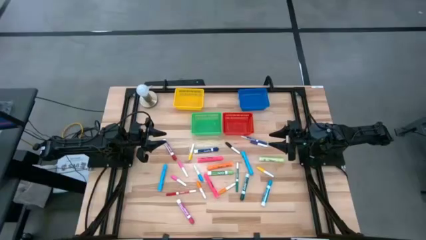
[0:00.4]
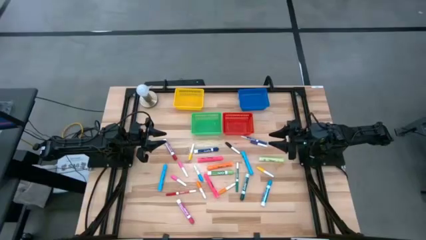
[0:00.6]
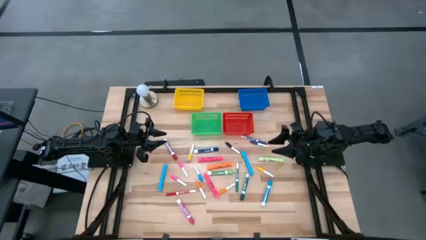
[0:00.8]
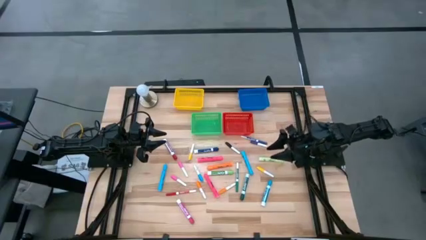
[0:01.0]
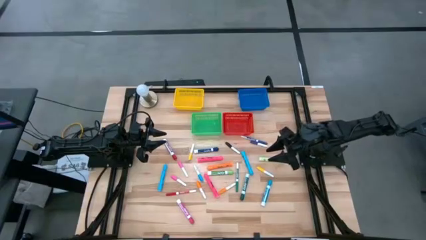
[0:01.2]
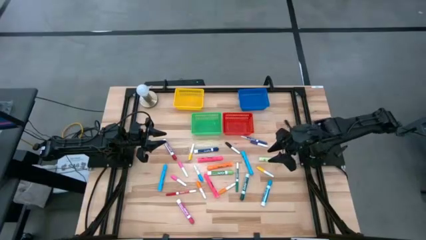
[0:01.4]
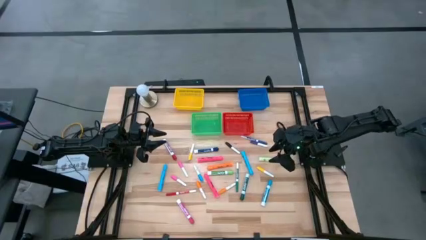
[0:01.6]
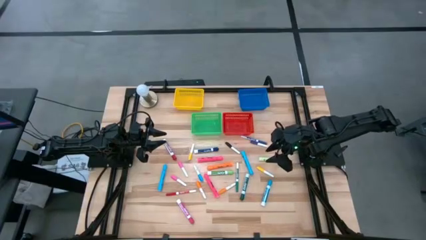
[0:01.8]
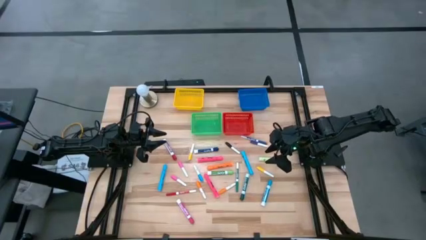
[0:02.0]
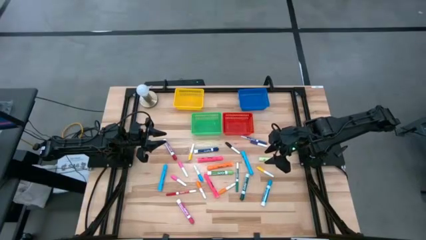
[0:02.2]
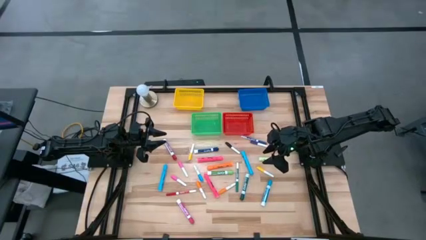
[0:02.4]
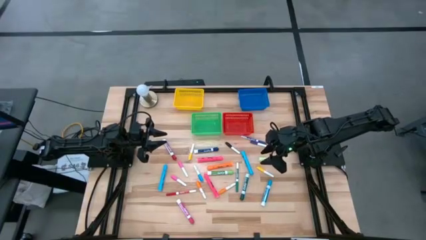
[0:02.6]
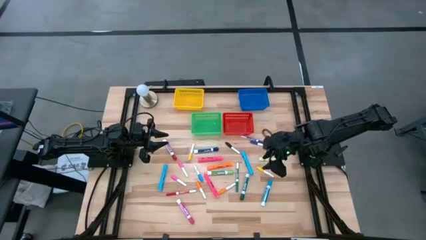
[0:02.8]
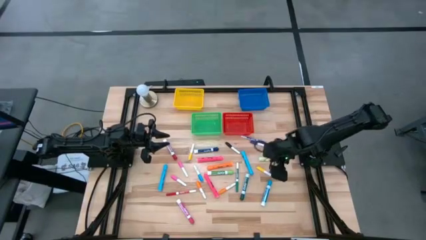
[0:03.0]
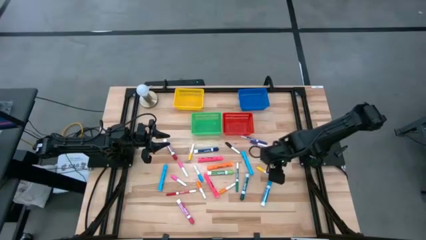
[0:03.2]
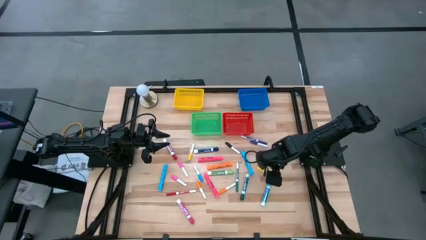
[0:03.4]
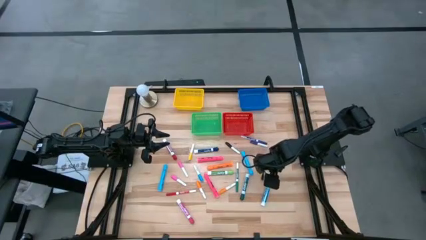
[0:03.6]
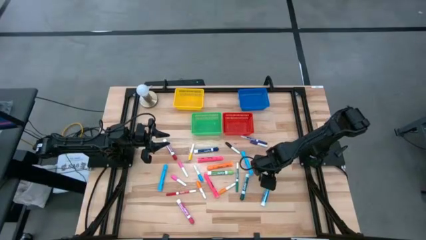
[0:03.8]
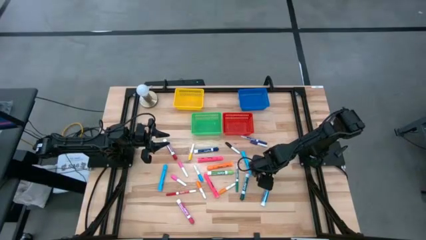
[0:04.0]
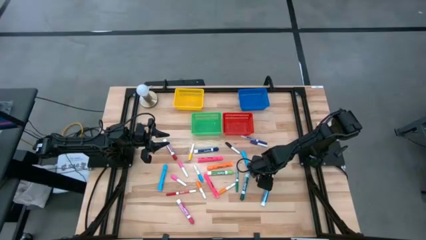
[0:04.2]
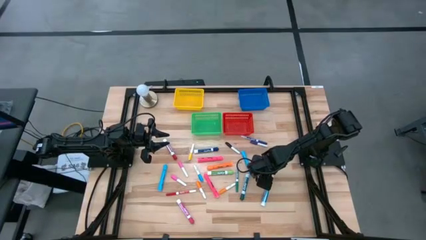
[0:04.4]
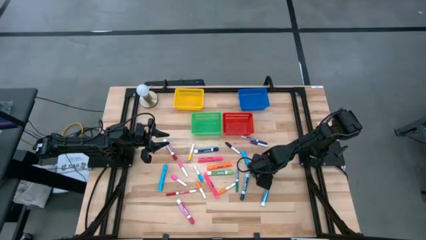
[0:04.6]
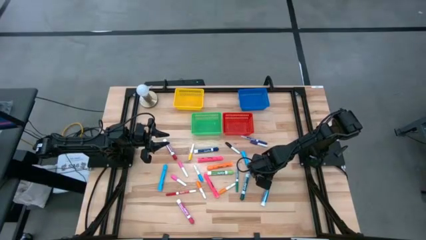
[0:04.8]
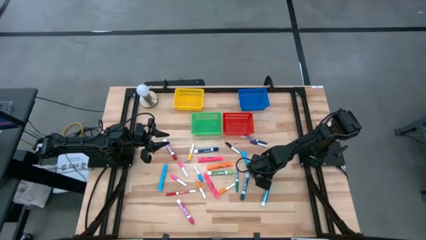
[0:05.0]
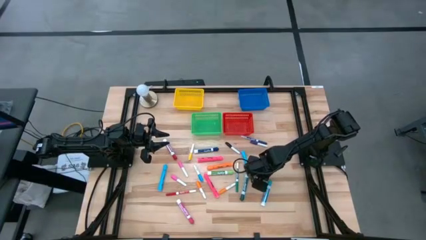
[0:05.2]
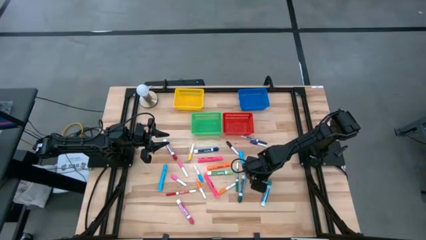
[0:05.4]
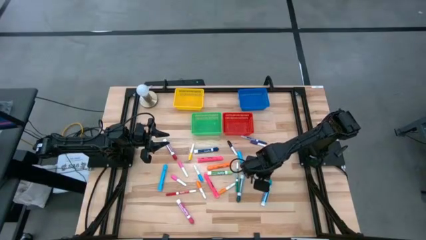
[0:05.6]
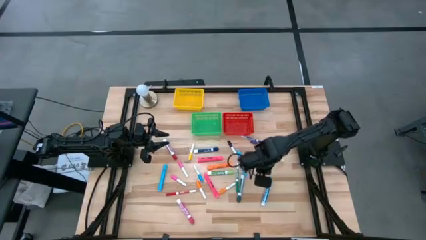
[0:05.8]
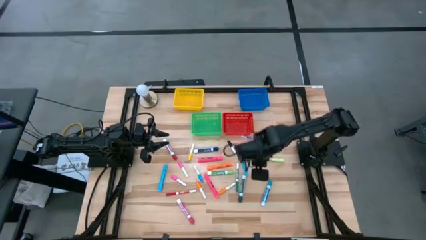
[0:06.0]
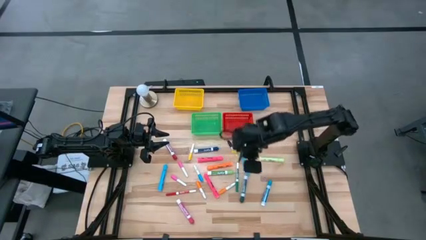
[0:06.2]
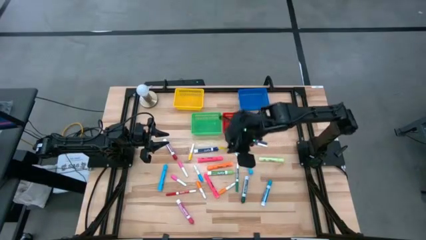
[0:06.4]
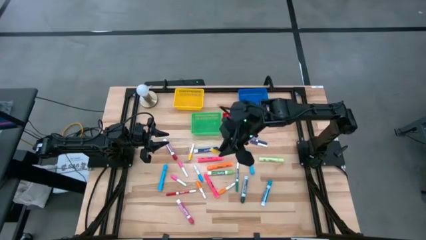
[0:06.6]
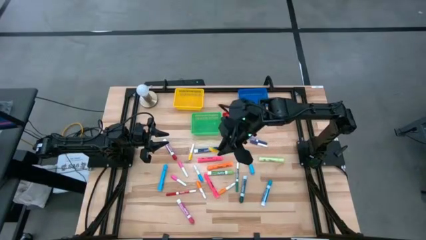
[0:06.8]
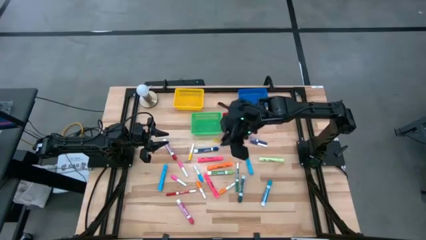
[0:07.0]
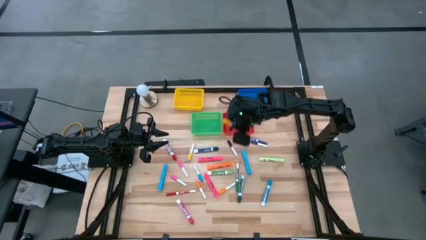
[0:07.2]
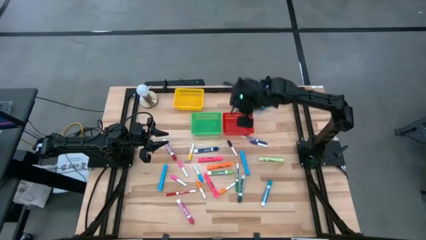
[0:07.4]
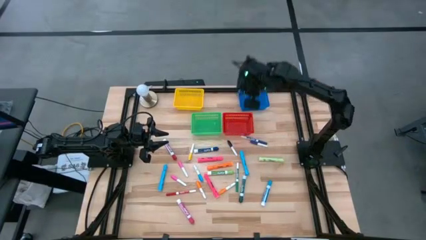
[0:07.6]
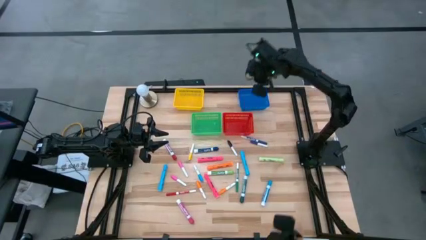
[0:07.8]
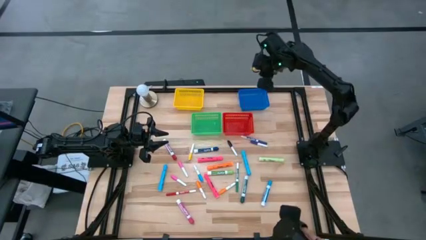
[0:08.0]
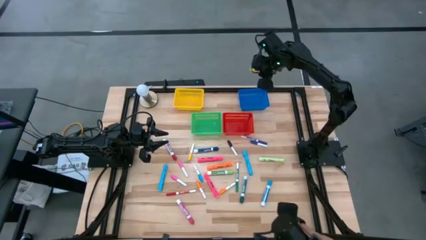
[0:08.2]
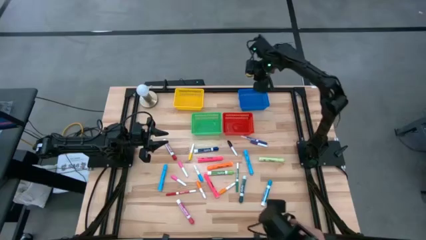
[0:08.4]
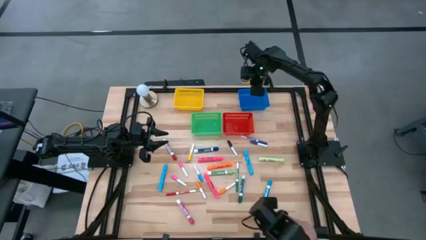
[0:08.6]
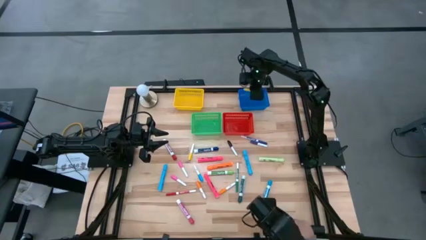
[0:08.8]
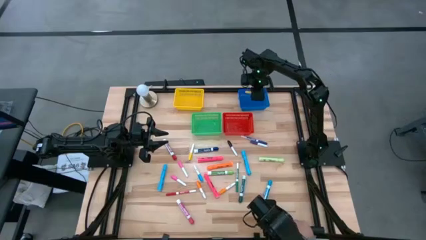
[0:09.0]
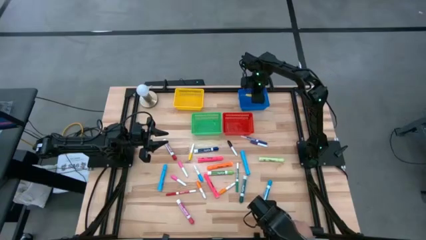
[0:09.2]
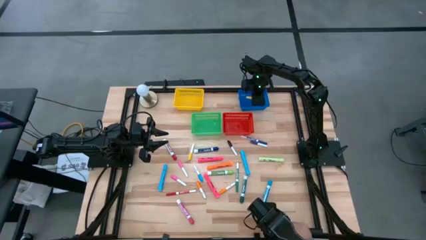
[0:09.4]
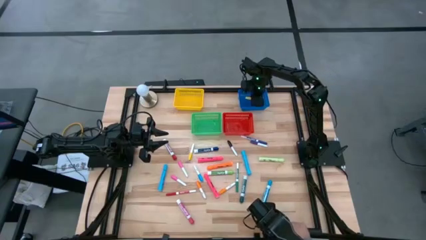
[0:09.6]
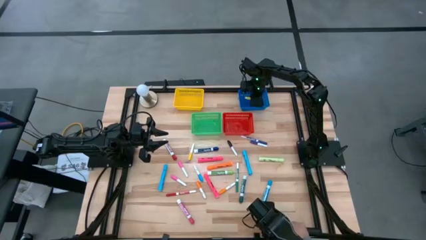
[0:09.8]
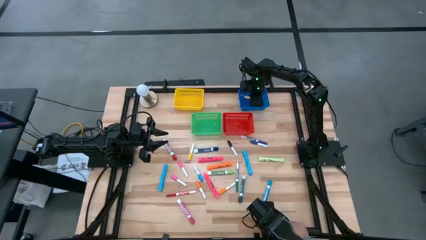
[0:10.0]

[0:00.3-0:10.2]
Task: Pick & Place Markers
Put the yellow highlighter into the blue bin
